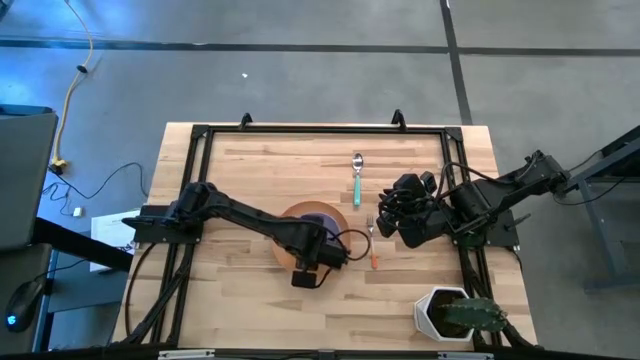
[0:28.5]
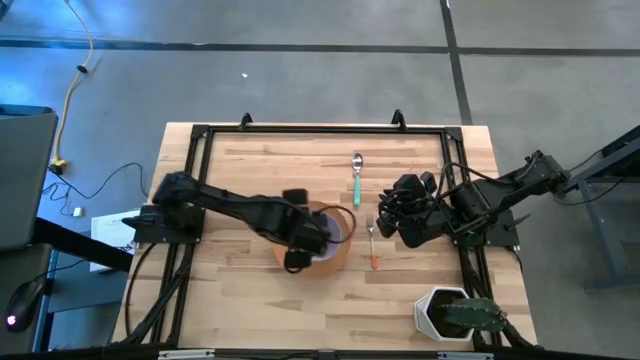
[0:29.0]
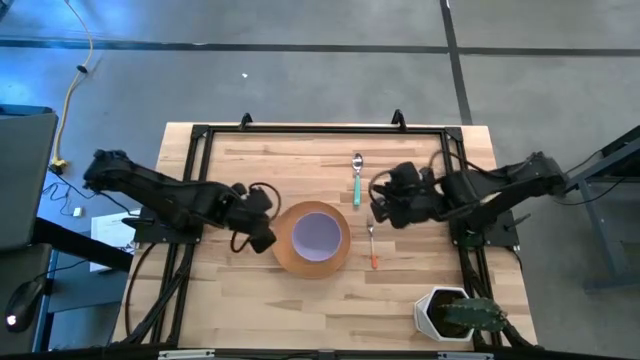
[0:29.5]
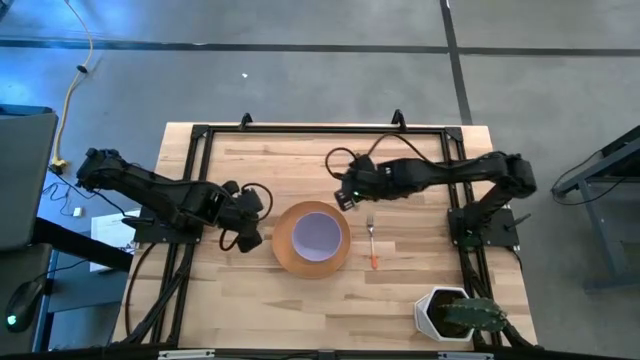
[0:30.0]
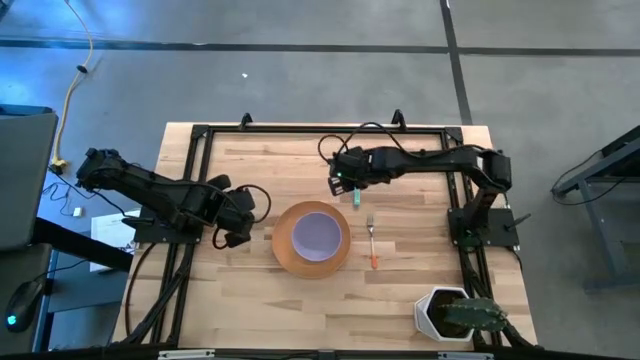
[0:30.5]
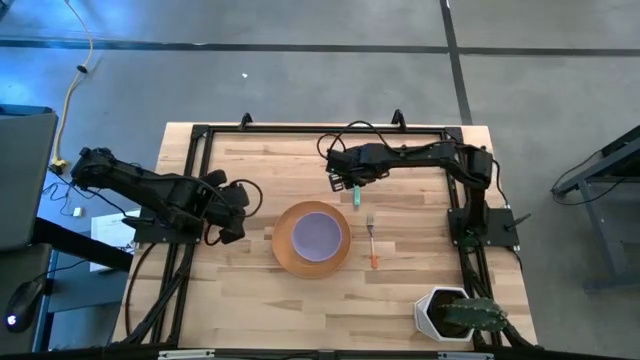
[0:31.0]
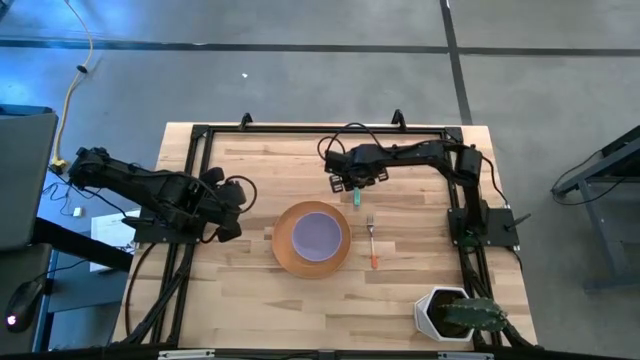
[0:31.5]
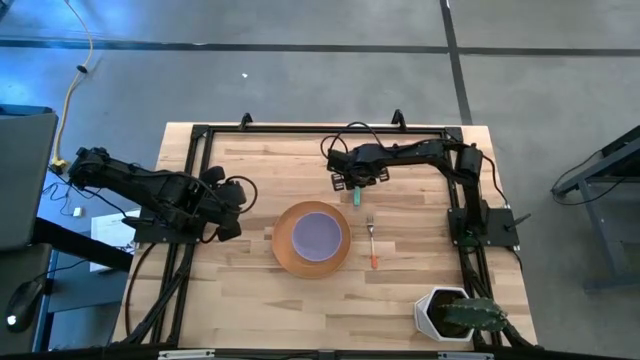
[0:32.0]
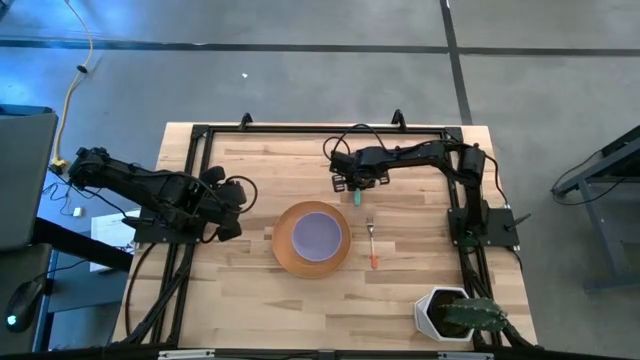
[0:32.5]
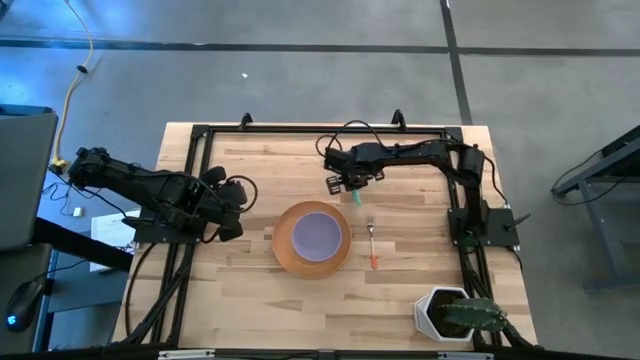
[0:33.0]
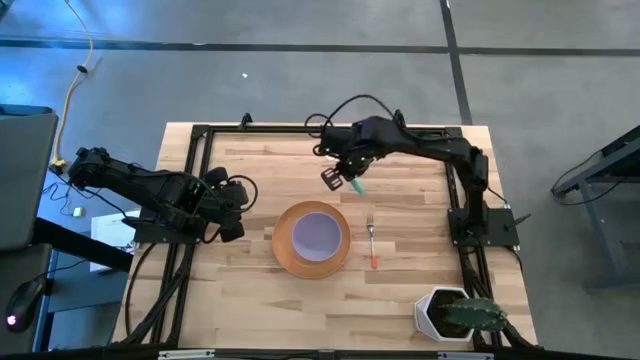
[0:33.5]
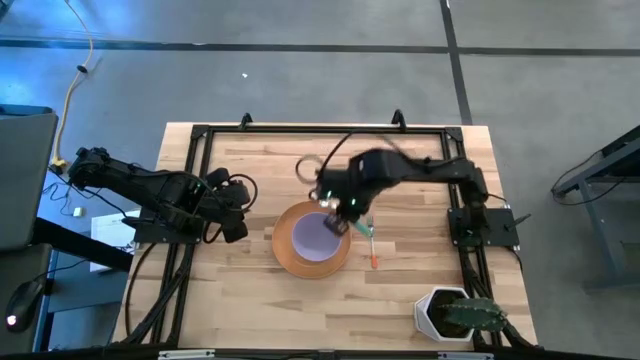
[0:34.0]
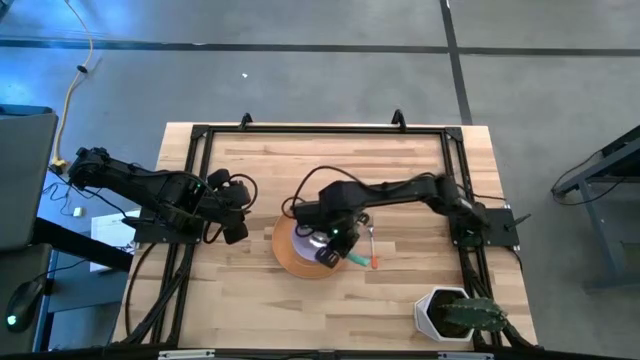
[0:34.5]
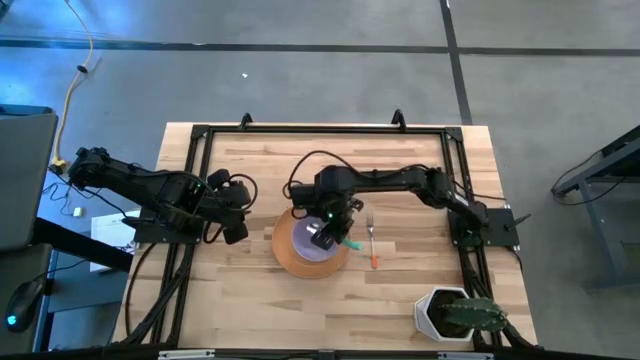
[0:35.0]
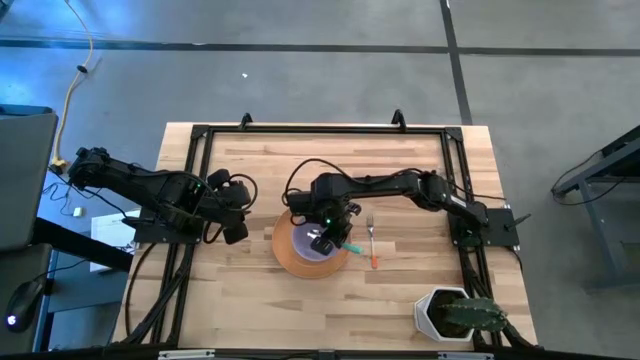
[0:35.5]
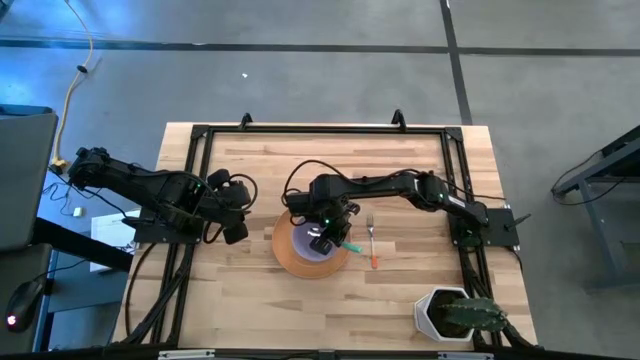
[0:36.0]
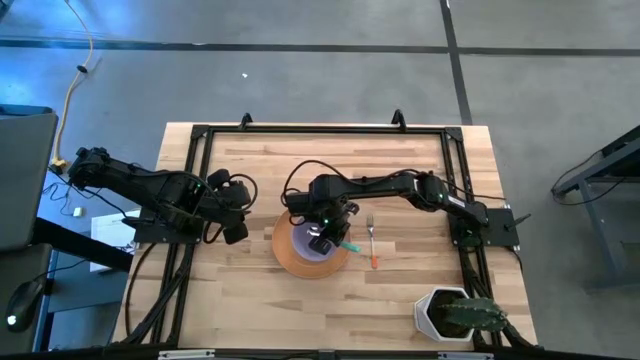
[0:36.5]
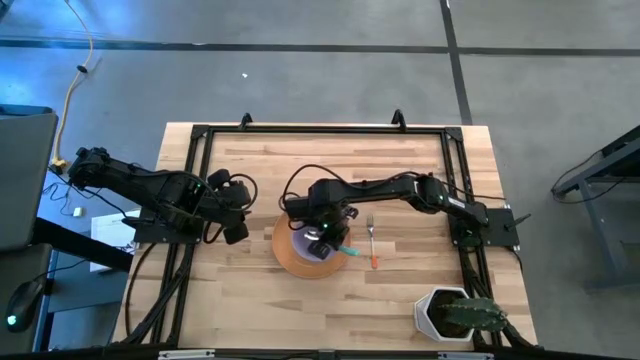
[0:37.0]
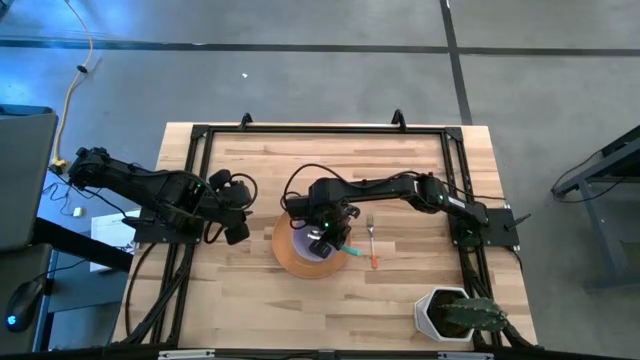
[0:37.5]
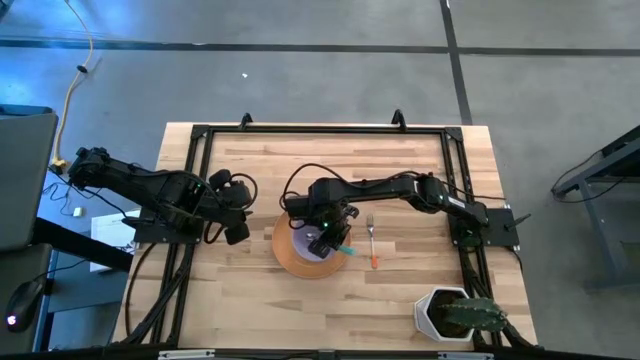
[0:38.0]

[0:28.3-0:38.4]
Task: Set table place
Put the blue spoon into the purple bowl on the orange plate

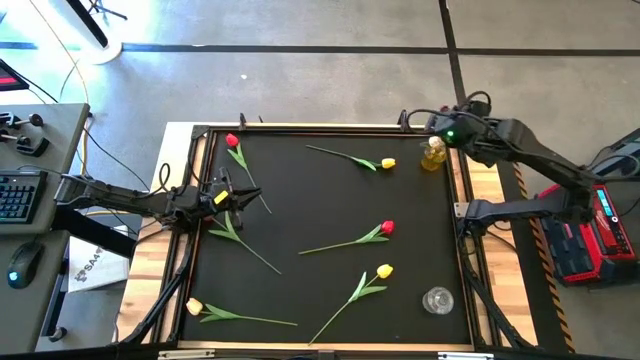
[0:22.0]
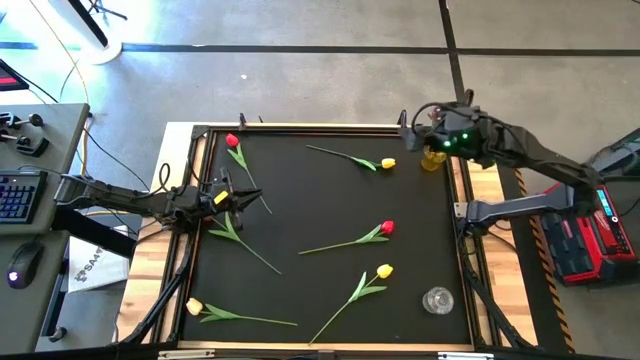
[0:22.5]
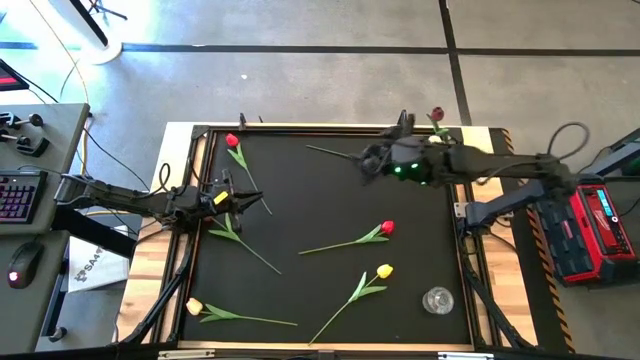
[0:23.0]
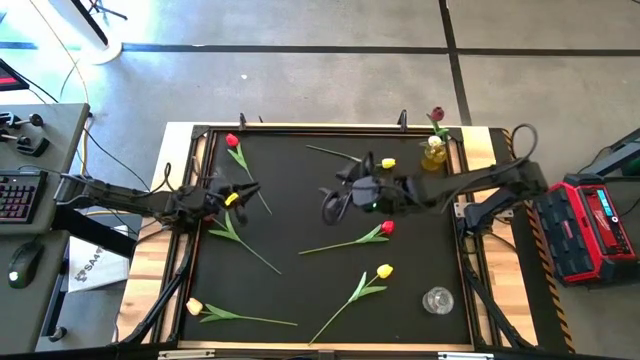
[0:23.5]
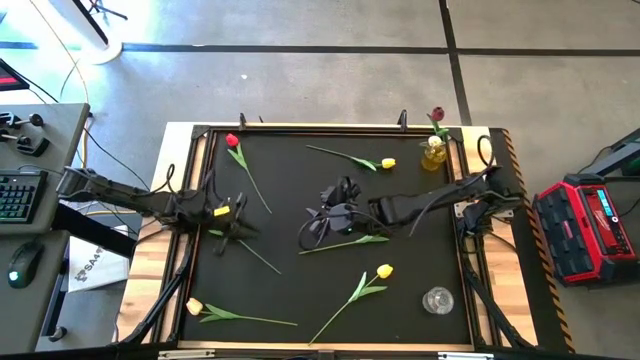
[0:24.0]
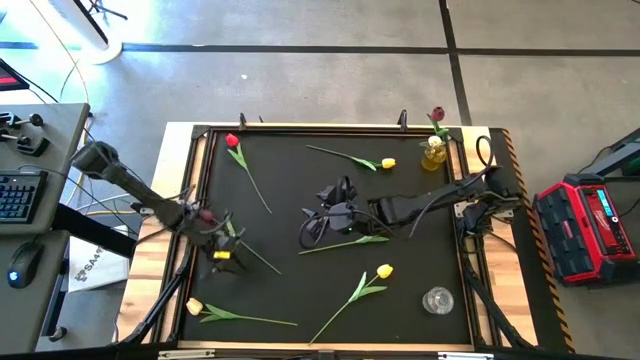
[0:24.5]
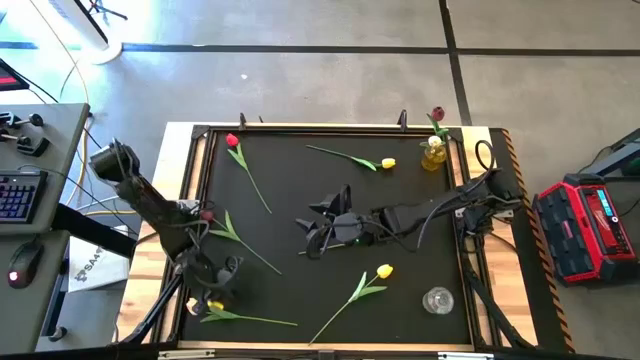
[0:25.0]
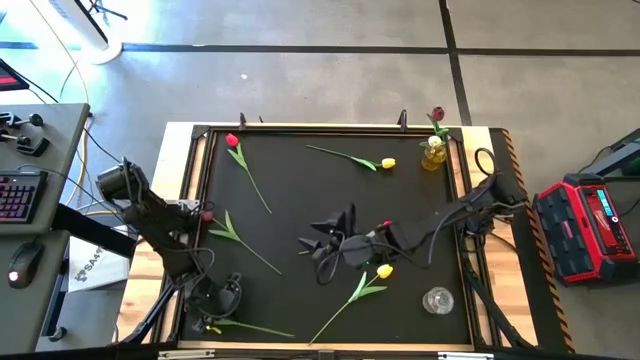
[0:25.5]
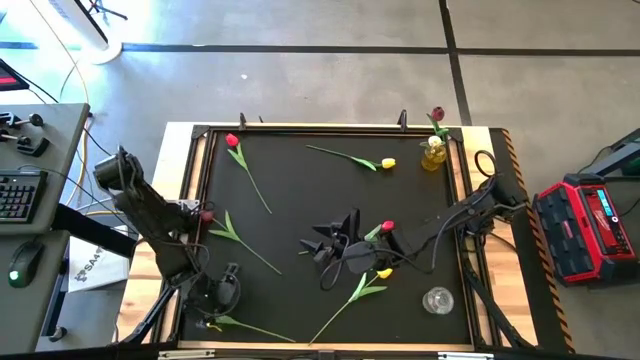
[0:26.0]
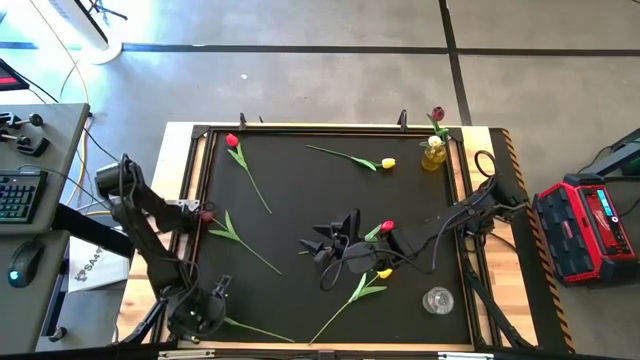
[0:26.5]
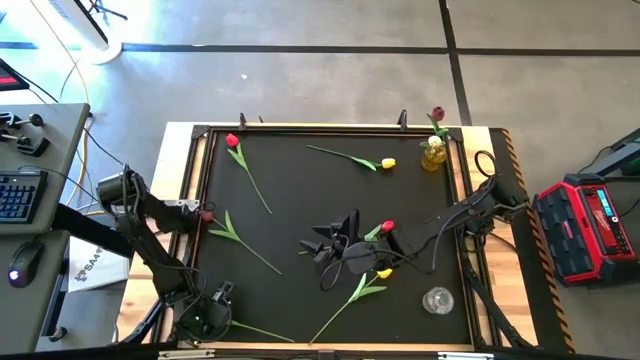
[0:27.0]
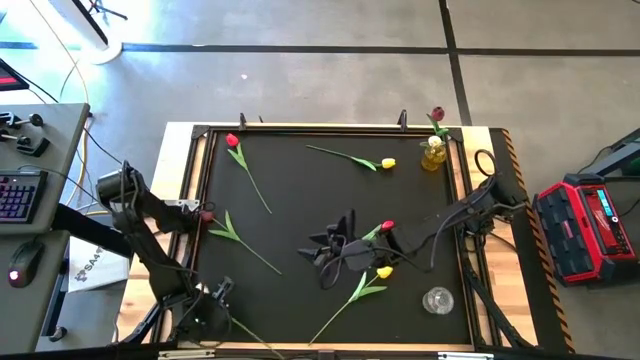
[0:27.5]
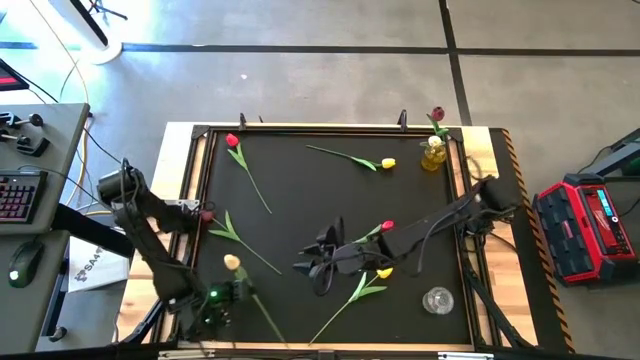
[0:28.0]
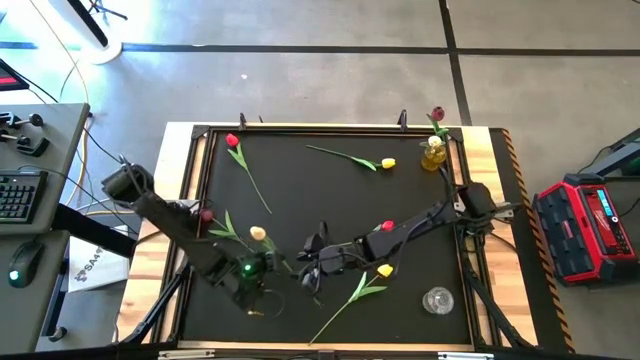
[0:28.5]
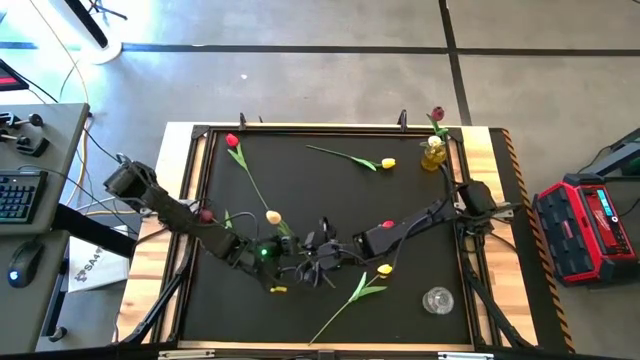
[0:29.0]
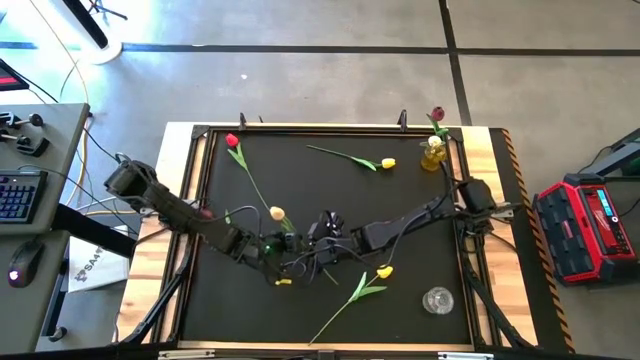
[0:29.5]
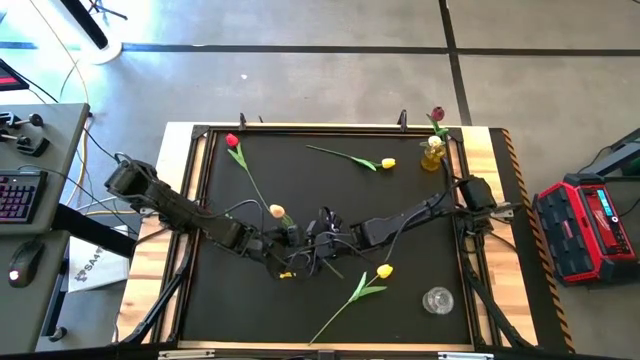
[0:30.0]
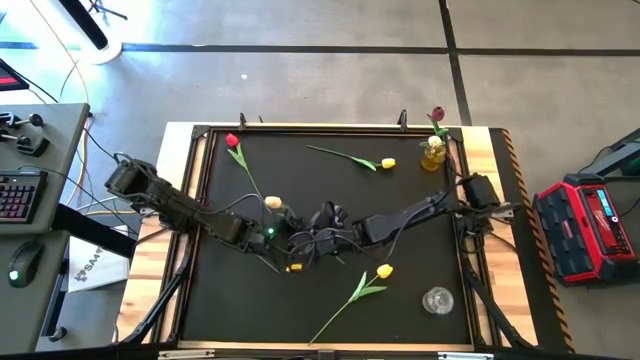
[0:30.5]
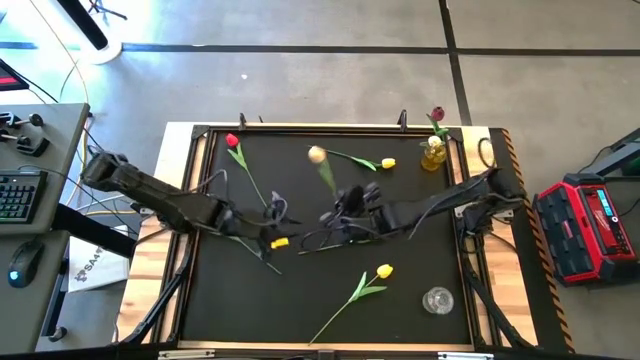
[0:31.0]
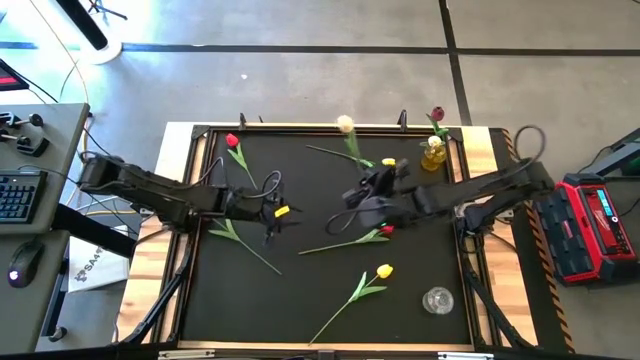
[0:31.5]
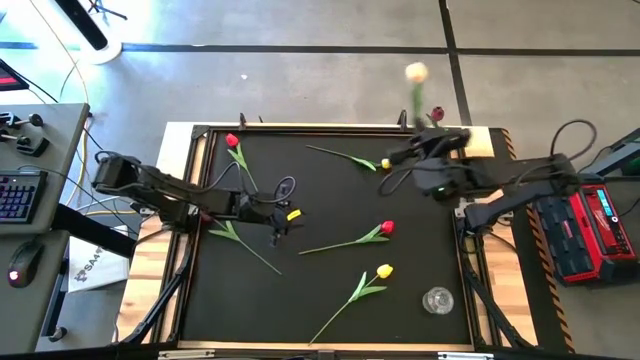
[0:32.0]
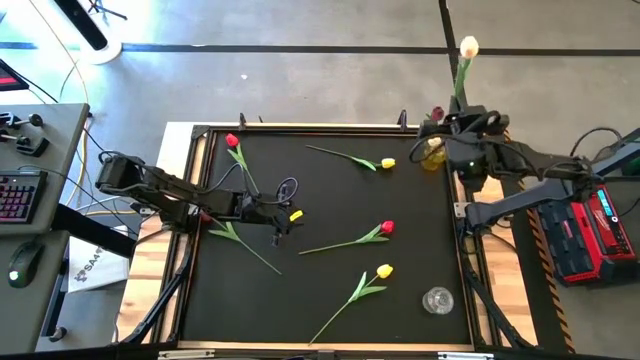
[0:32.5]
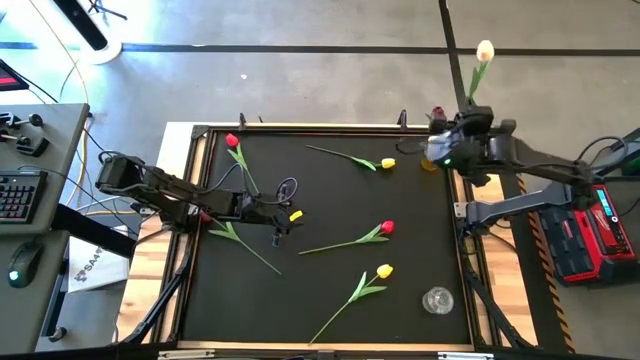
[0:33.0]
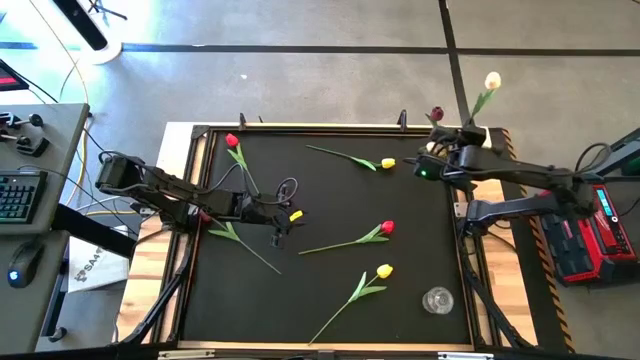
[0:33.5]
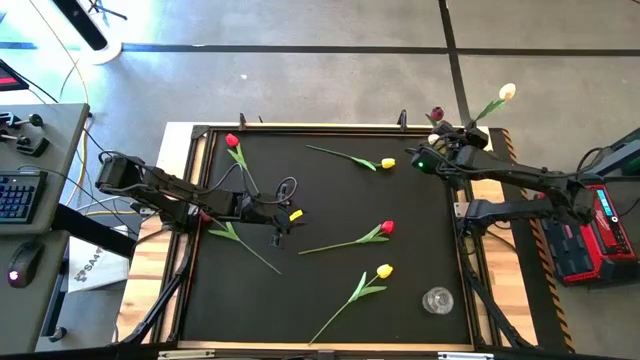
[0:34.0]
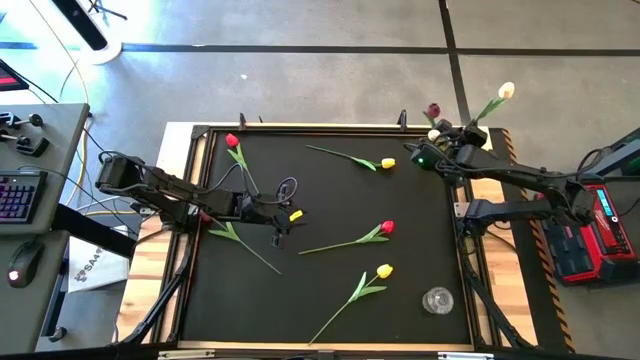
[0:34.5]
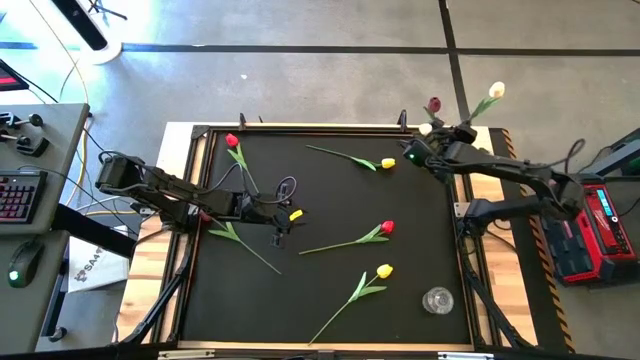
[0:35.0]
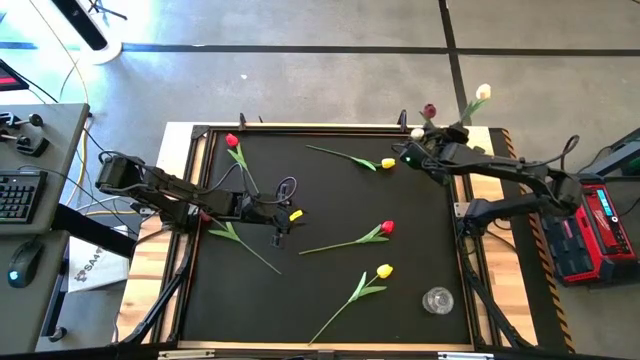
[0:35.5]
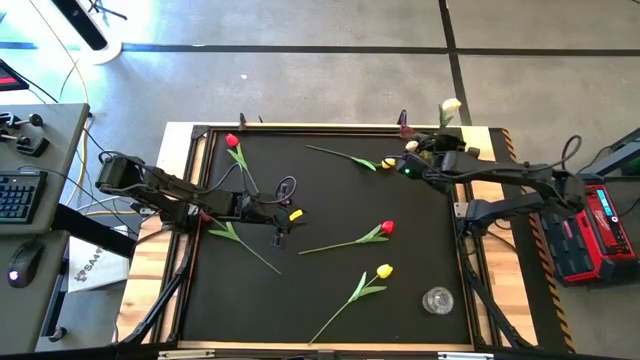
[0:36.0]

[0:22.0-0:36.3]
Task: Sort flowers into vase by color
Put the white flower into the yellow flower vase
